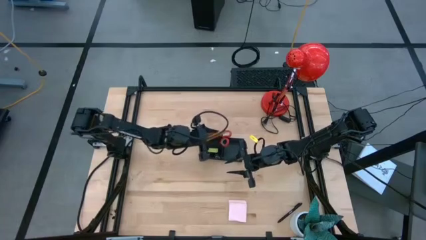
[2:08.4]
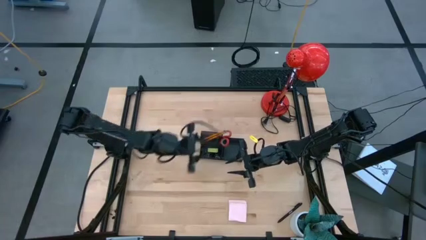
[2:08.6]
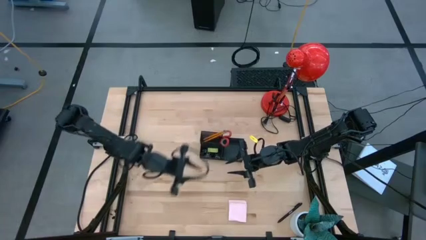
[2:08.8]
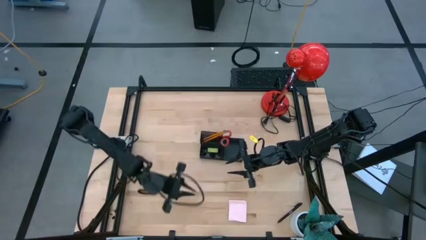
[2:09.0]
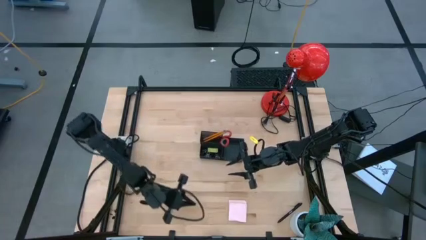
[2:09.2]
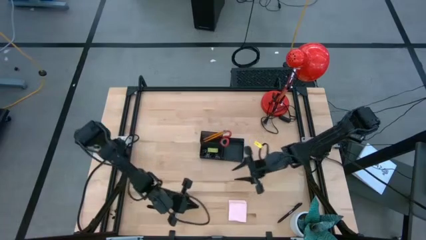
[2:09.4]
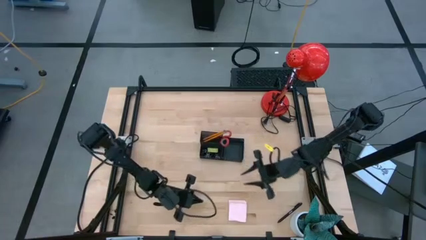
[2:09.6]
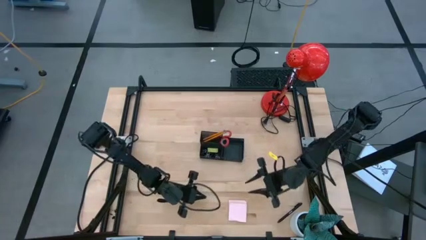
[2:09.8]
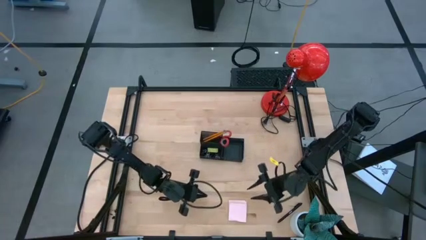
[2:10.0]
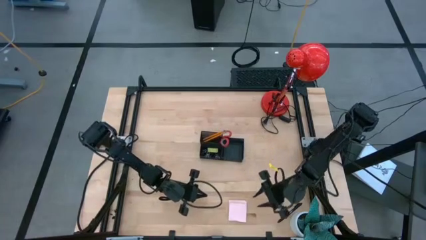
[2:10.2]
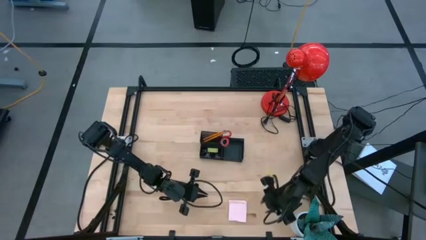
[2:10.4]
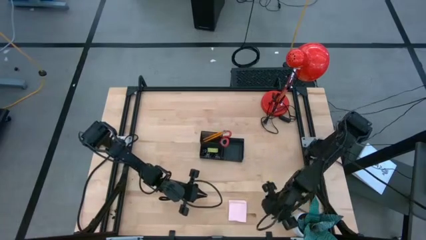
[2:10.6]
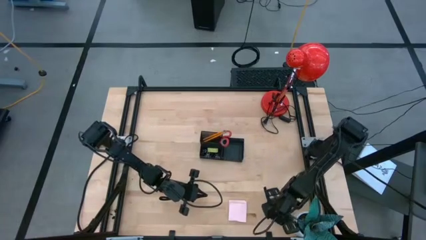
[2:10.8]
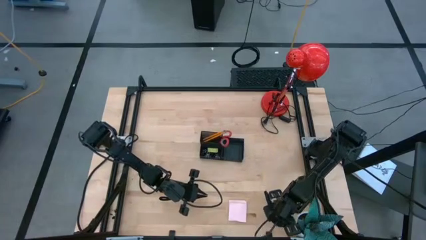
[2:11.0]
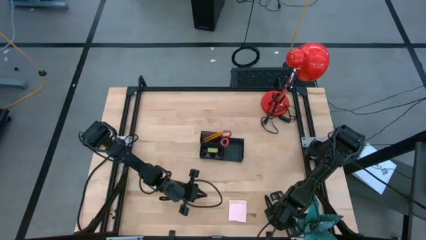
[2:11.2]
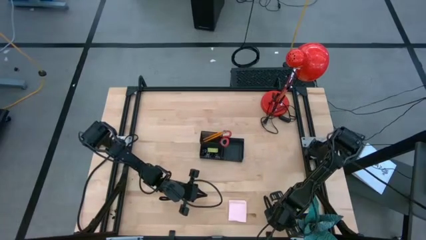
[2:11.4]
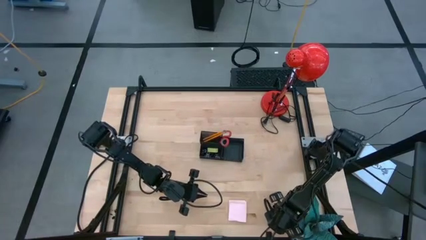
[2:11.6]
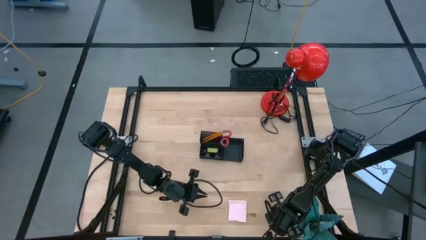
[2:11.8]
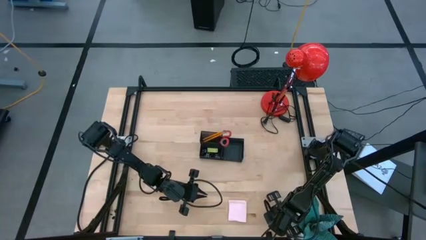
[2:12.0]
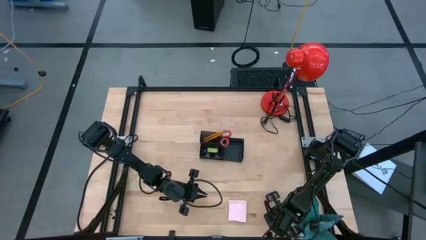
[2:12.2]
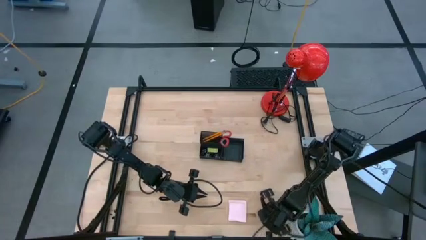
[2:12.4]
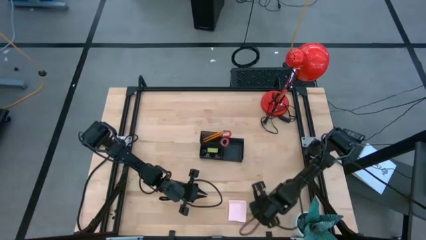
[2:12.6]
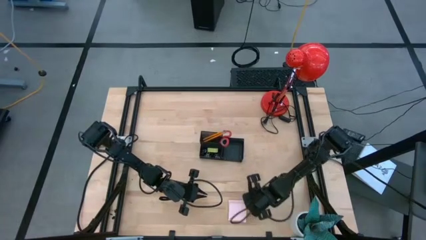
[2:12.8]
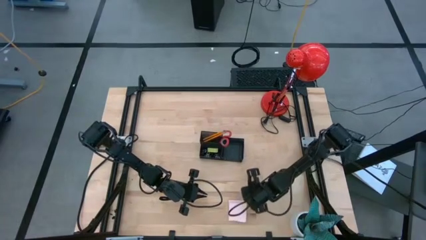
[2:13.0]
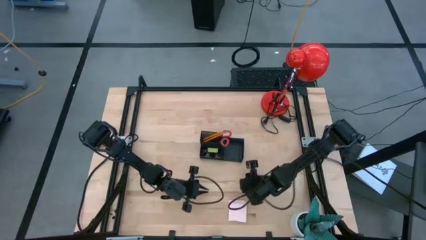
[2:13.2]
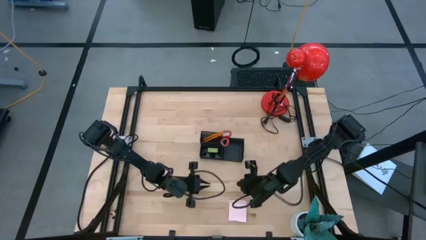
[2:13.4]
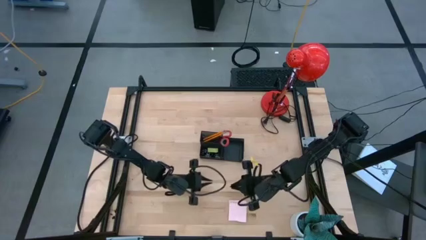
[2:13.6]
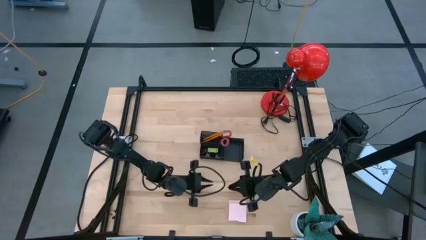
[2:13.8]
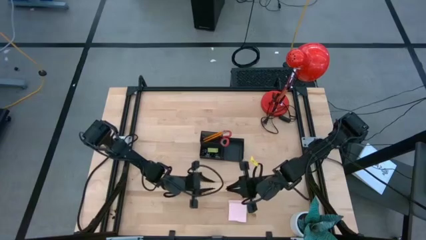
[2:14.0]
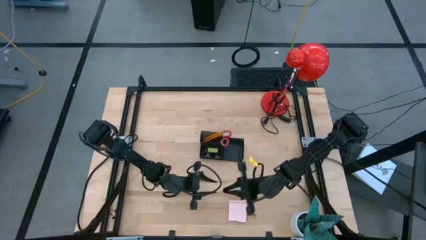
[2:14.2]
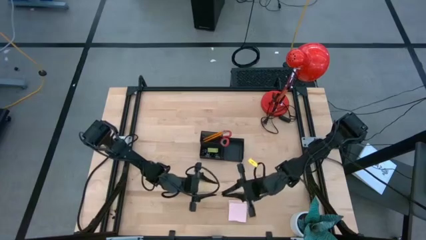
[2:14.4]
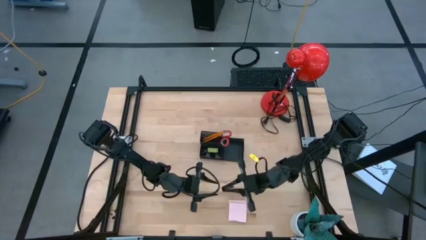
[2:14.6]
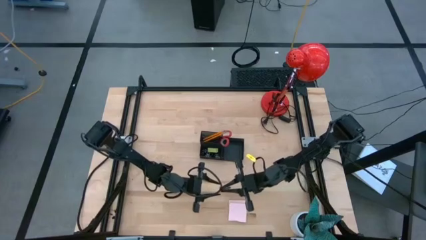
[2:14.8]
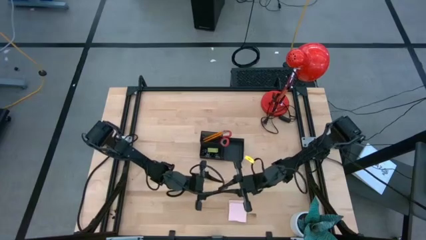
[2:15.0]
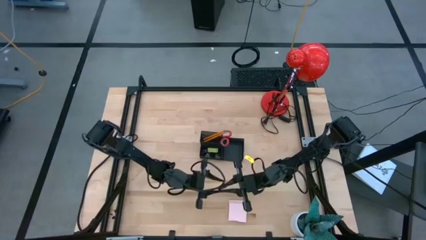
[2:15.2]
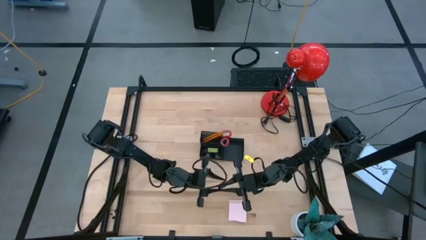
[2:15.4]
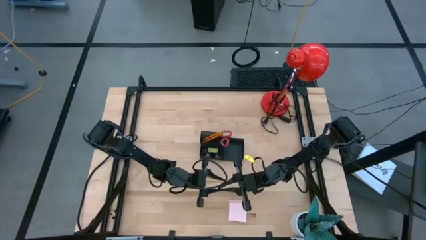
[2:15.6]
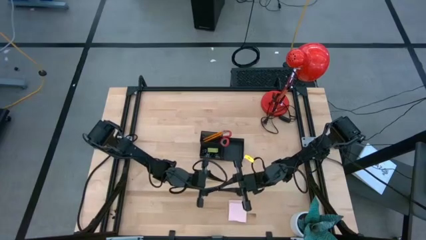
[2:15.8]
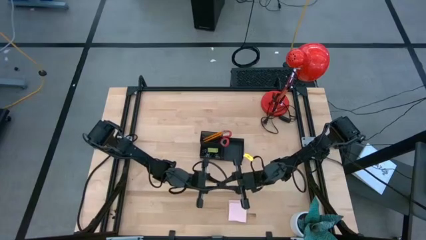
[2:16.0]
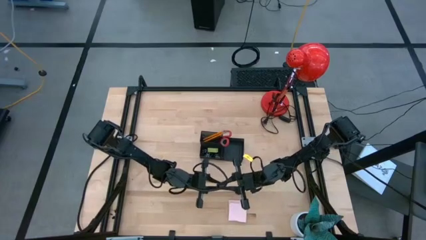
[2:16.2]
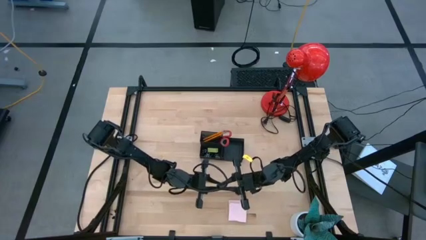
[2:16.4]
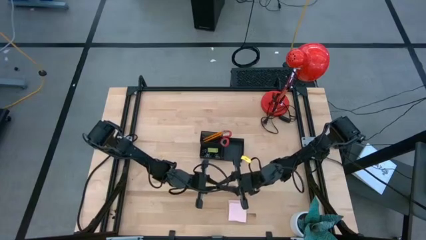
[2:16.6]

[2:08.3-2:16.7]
Task: Pick and place office supplies into organizer
Put the black pen into the black desk organizer

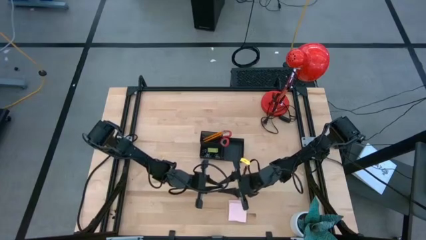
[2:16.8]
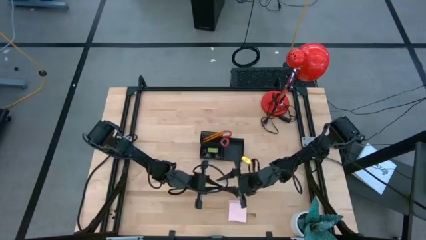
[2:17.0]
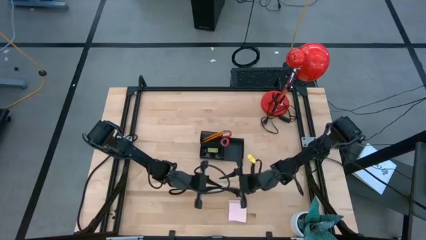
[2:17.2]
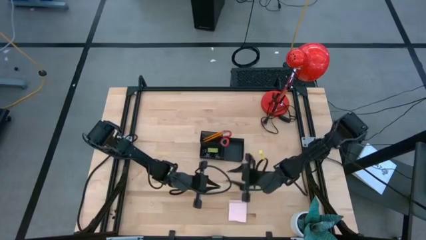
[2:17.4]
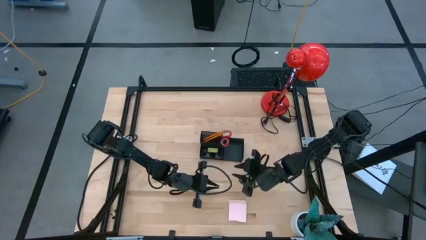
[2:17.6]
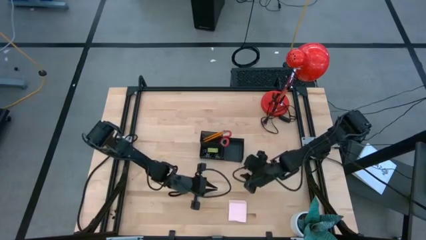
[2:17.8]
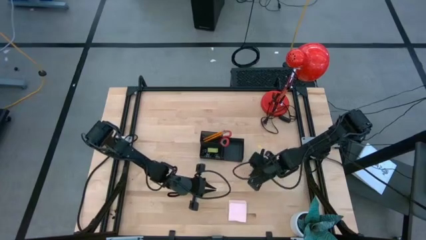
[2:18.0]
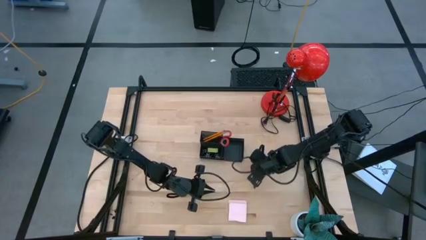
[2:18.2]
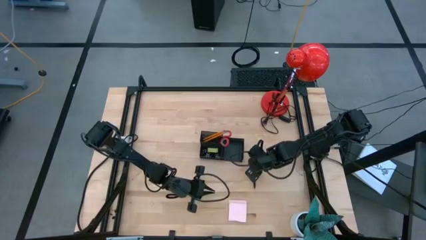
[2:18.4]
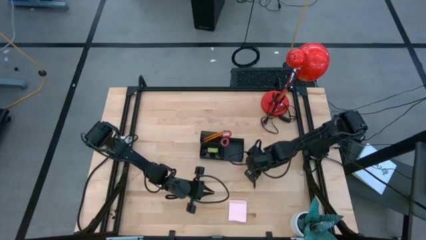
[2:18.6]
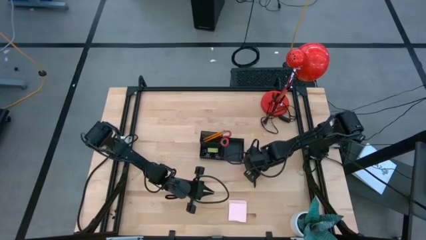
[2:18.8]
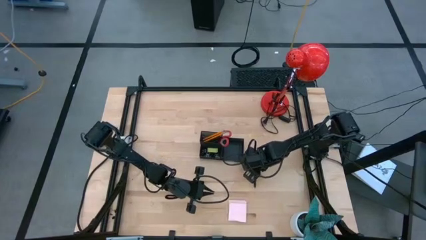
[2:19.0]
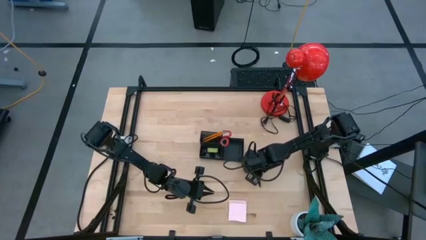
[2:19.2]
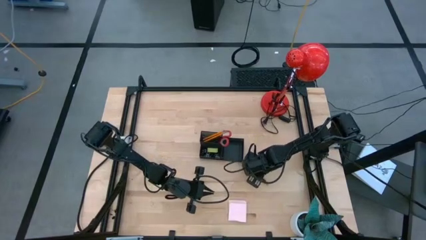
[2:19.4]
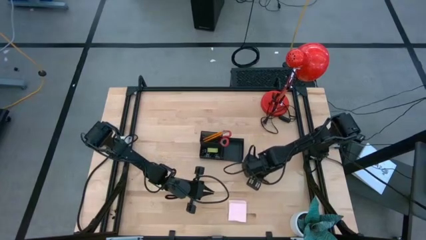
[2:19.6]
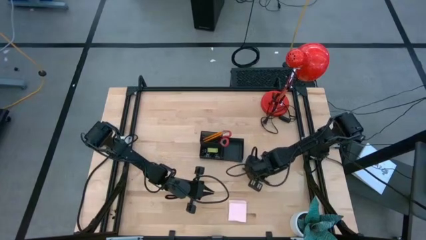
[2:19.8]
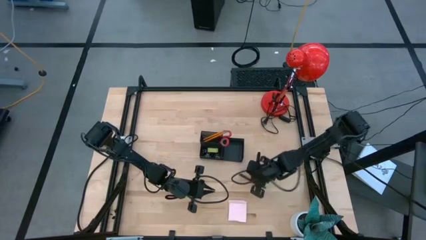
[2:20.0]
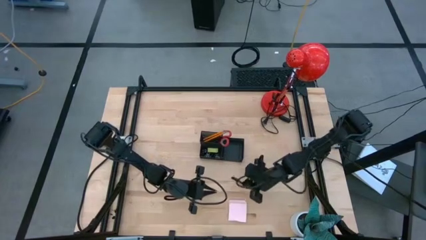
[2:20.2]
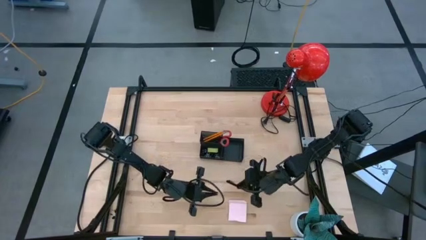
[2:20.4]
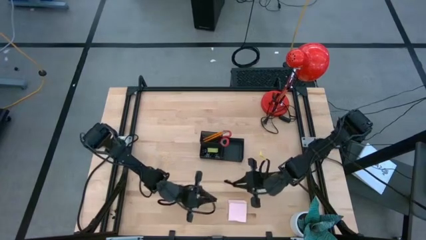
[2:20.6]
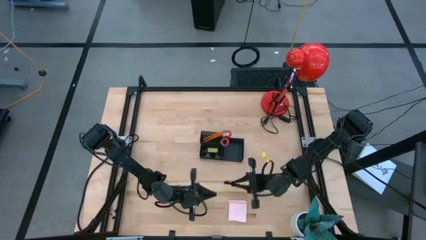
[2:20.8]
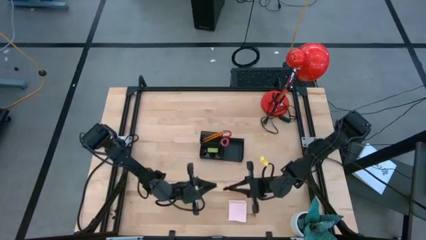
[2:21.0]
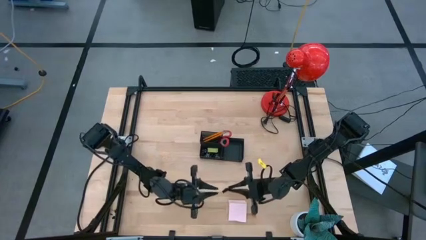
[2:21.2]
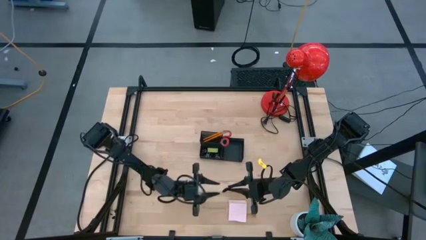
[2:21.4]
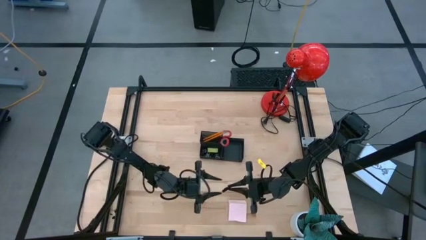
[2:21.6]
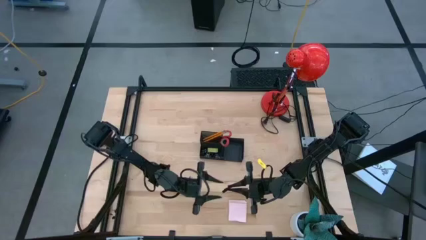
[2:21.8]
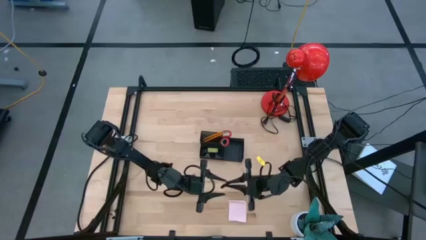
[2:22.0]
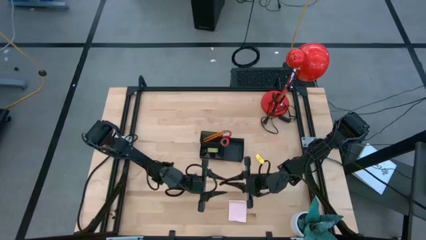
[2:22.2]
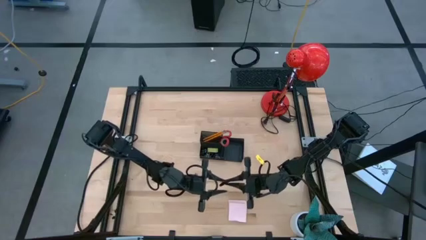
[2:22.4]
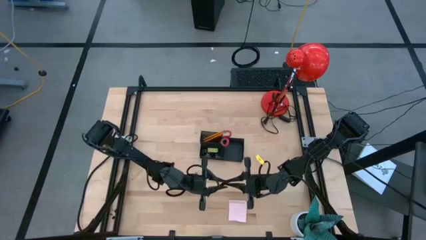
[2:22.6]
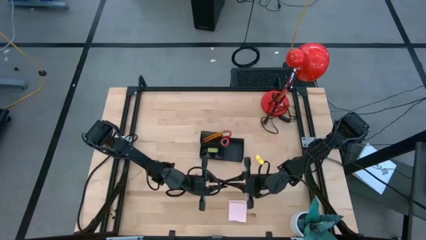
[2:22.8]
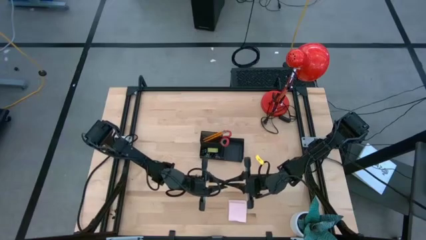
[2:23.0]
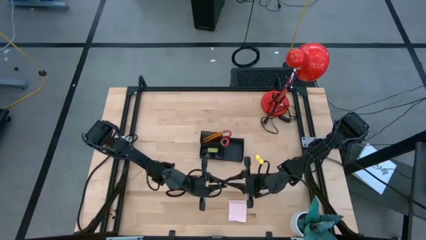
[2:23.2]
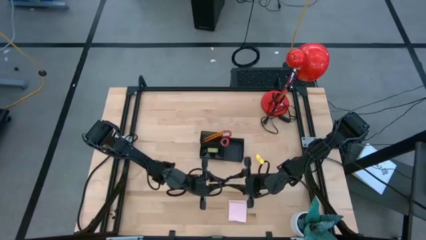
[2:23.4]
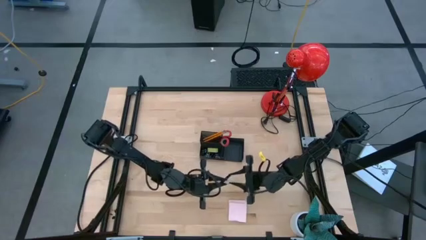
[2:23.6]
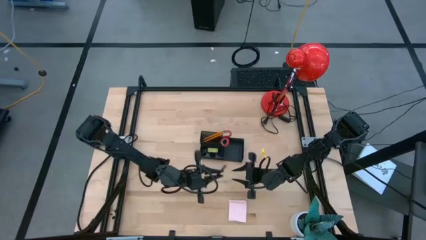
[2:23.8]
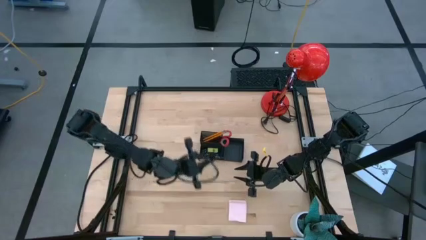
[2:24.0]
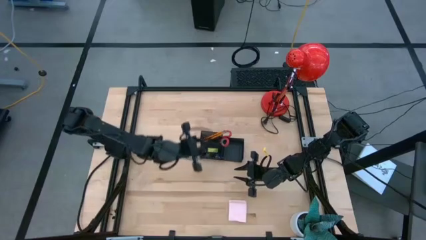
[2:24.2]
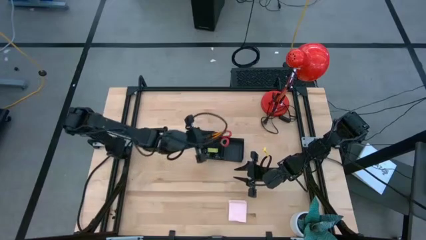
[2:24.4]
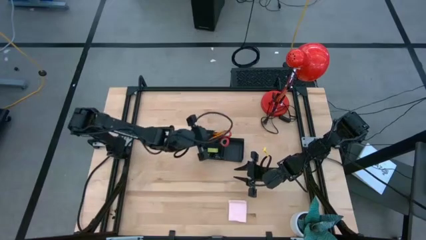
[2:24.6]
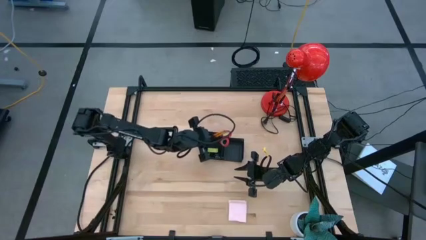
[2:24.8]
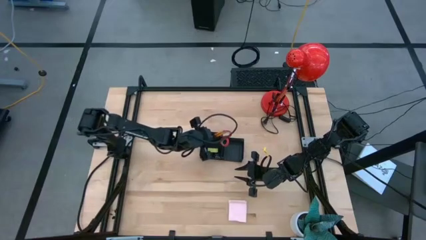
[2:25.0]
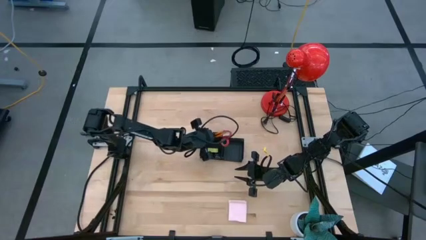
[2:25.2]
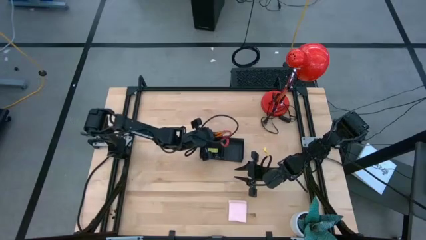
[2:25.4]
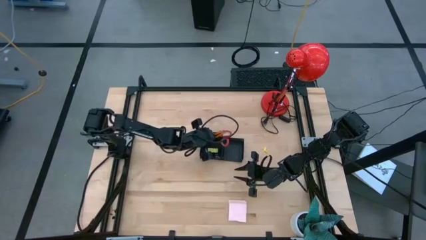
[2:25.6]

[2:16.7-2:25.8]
Put the black pen into the black desk organizer
